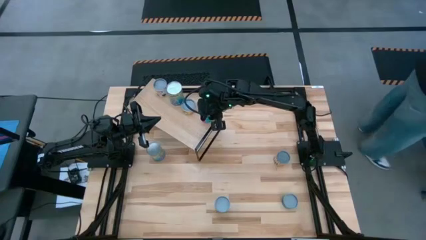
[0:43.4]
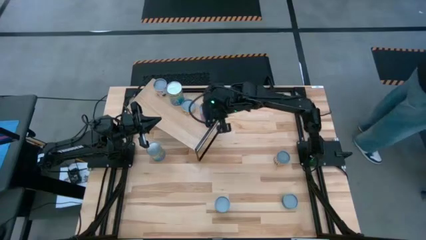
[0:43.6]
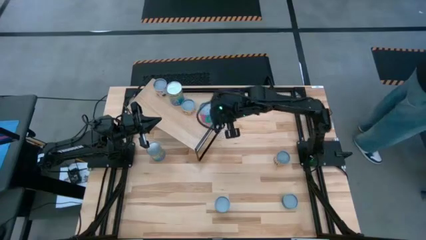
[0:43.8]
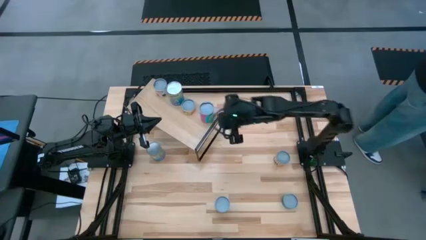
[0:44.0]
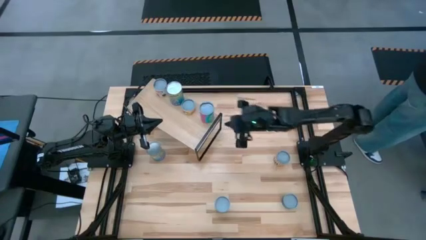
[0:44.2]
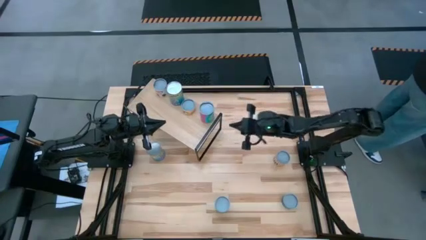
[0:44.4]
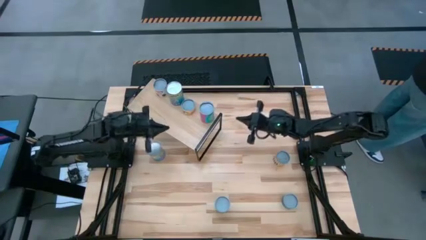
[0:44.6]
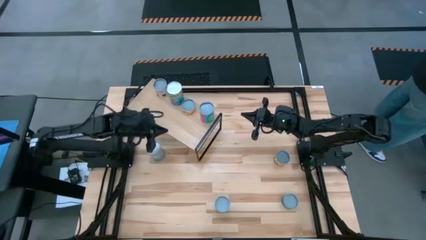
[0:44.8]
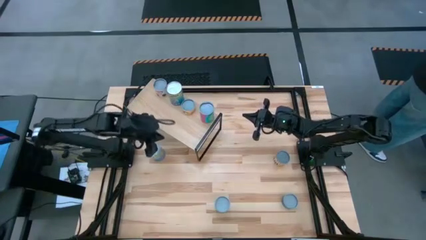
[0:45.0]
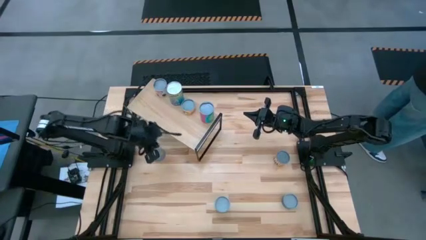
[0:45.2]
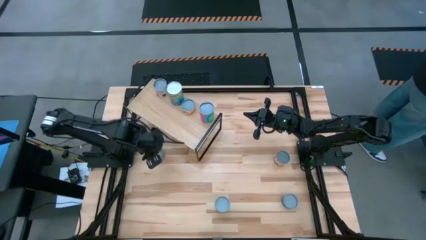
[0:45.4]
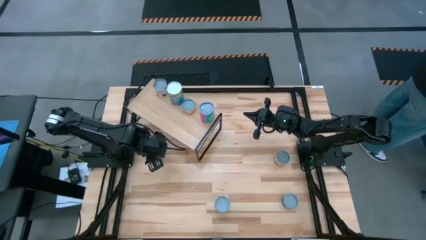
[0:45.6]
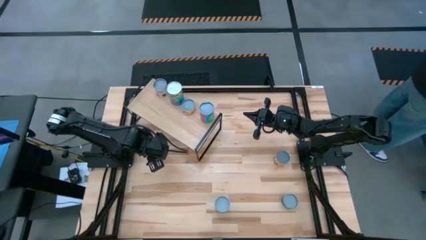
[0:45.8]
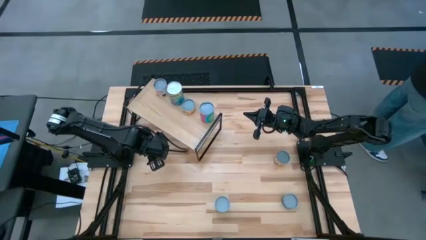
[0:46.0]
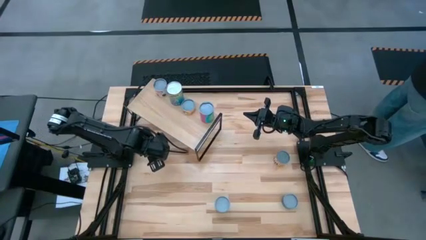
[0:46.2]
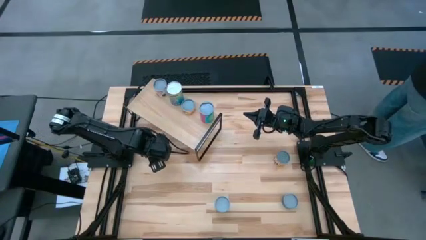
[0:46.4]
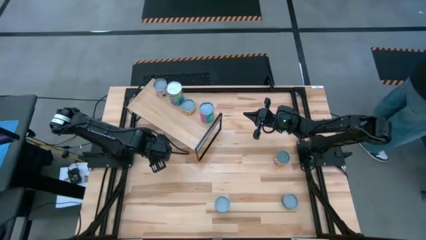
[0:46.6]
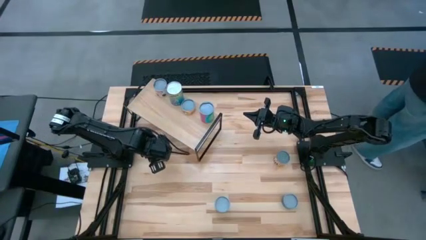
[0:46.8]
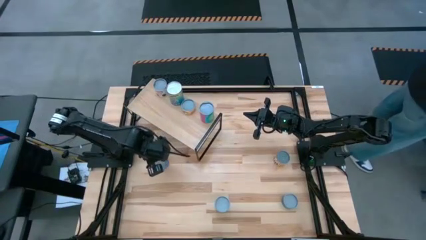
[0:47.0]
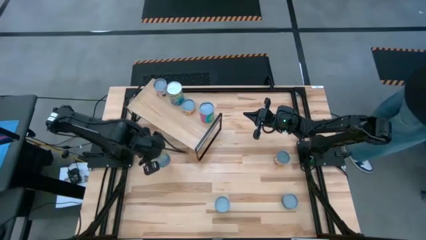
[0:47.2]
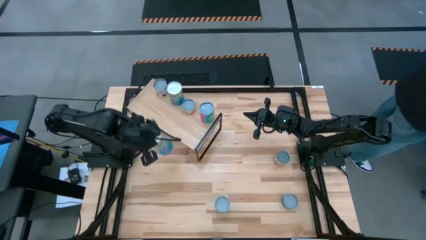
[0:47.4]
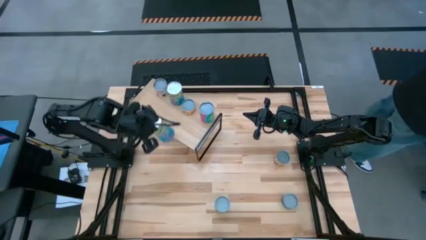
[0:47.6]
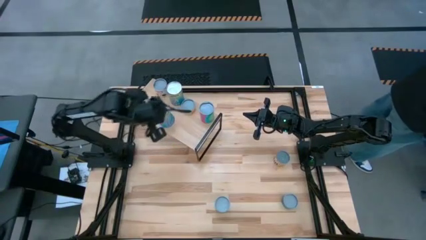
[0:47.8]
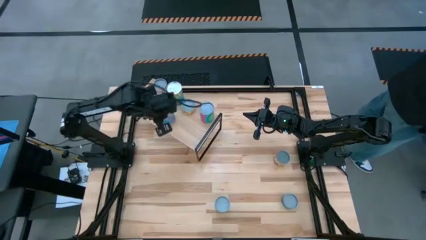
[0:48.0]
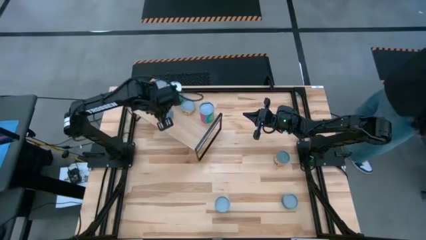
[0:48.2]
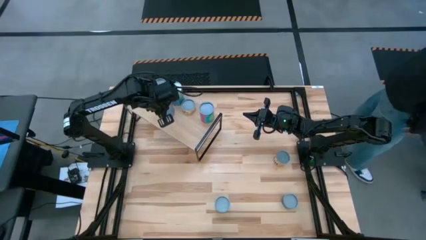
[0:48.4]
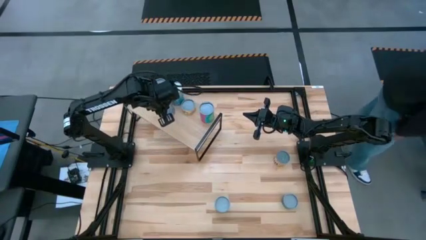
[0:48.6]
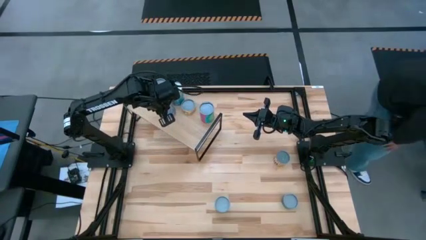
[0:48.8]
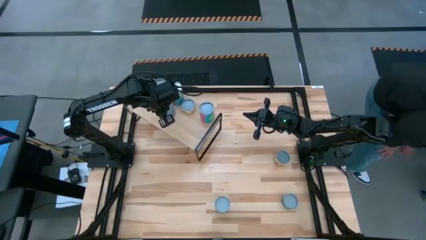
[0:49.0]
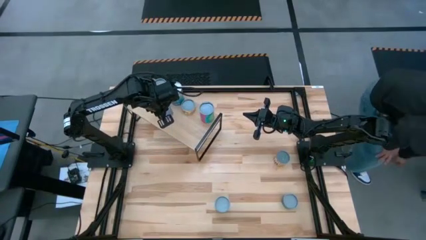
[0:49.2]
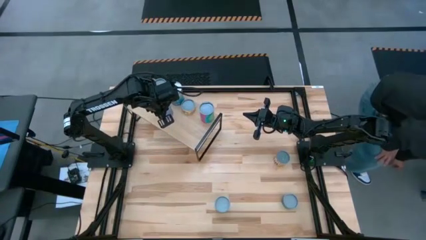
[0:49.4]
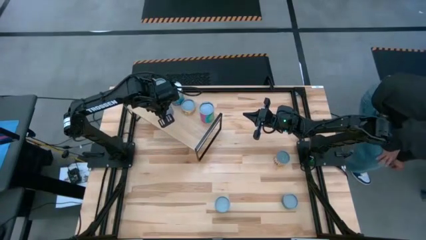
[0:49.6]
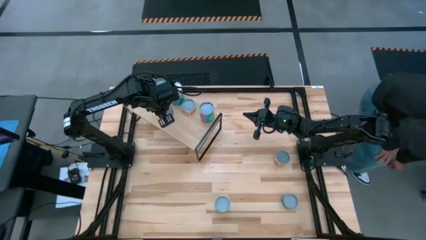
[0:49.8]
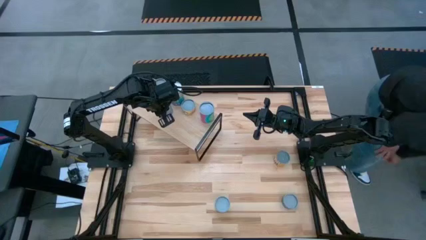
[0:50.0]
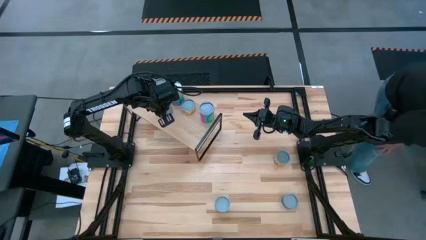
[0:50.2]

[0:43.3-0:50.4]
Task: Pick and place cans onto a shelf
Put the canned peaches on the shelf

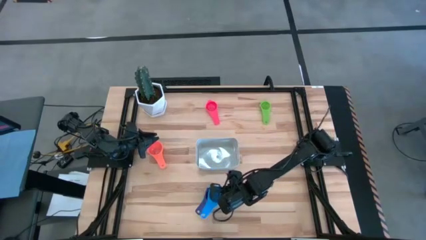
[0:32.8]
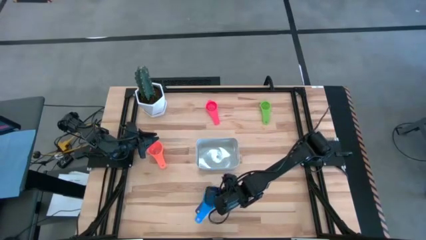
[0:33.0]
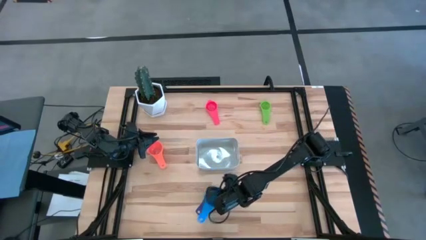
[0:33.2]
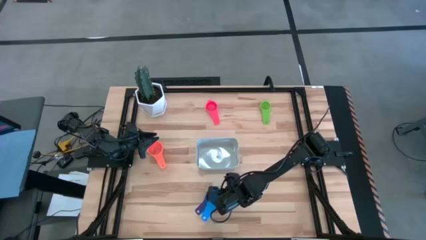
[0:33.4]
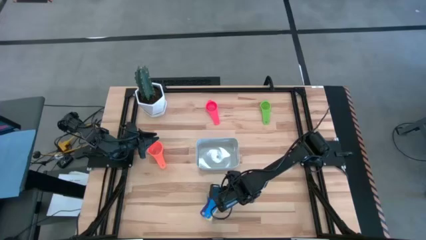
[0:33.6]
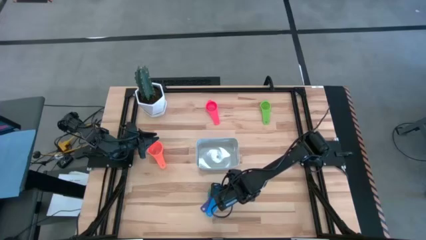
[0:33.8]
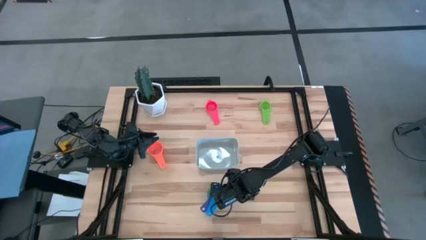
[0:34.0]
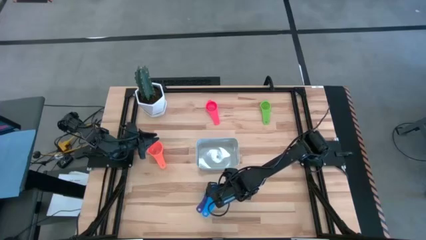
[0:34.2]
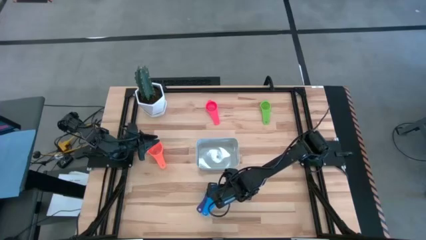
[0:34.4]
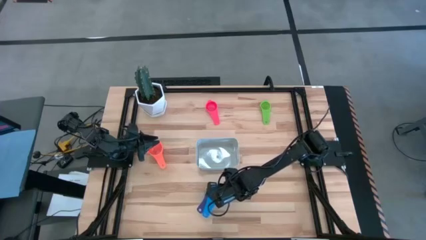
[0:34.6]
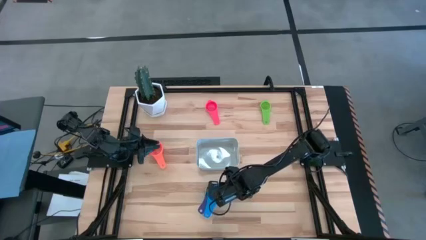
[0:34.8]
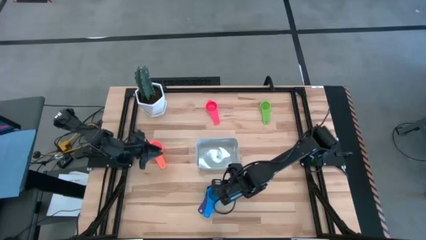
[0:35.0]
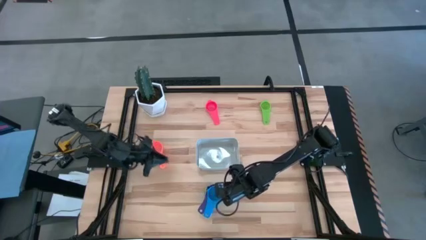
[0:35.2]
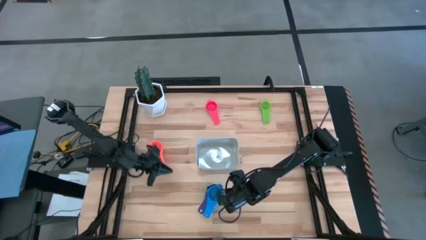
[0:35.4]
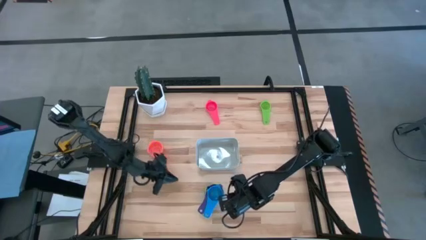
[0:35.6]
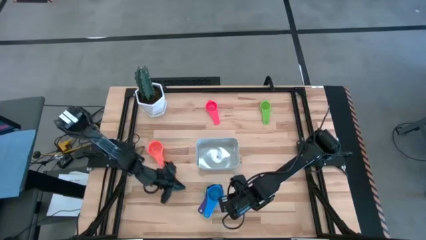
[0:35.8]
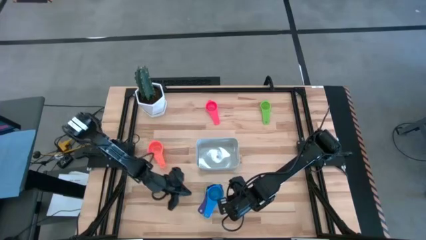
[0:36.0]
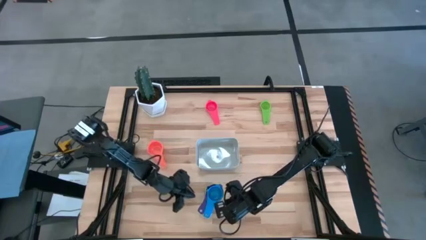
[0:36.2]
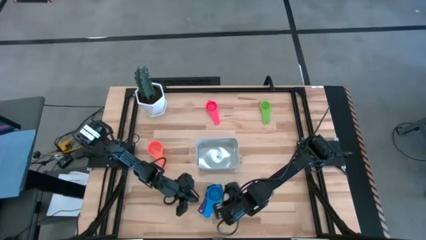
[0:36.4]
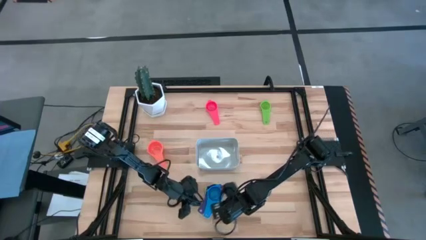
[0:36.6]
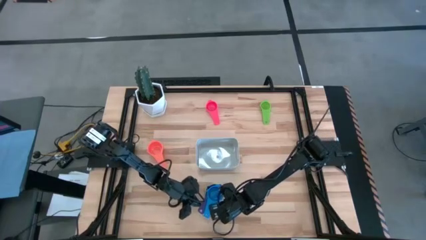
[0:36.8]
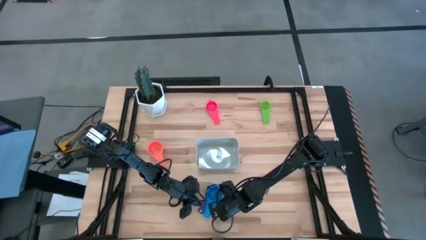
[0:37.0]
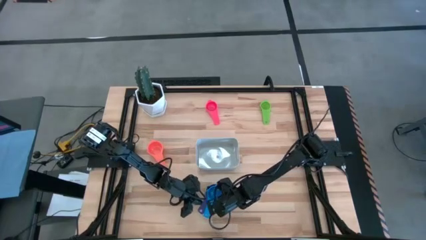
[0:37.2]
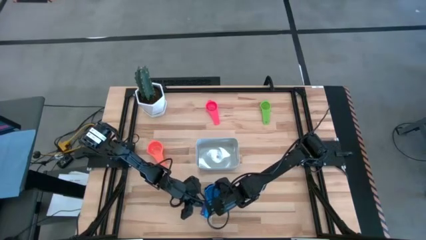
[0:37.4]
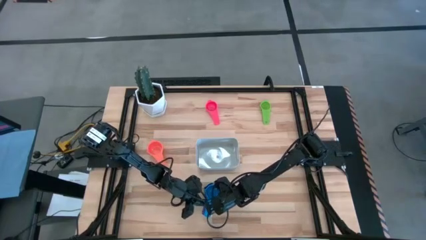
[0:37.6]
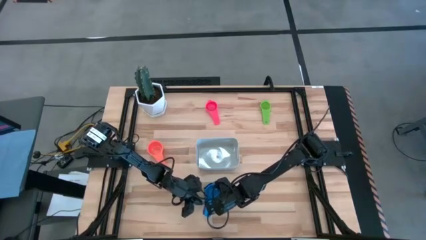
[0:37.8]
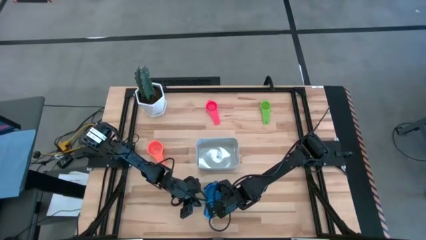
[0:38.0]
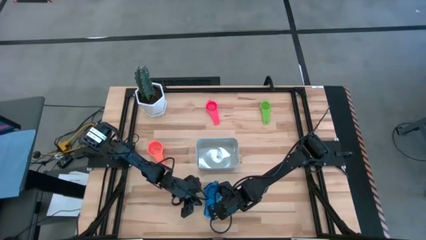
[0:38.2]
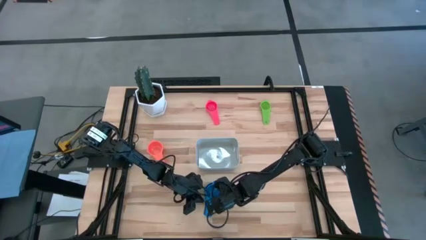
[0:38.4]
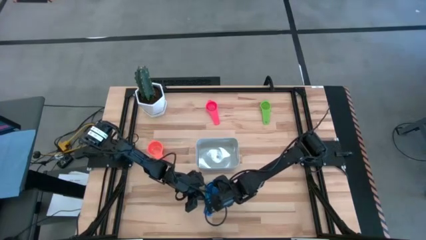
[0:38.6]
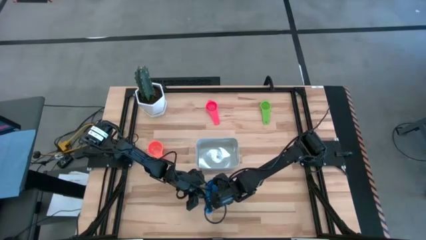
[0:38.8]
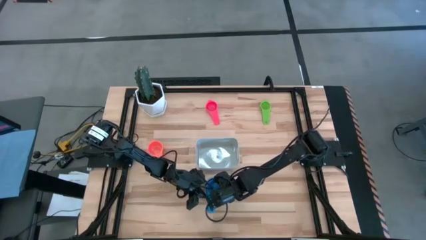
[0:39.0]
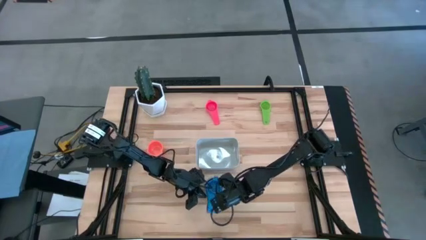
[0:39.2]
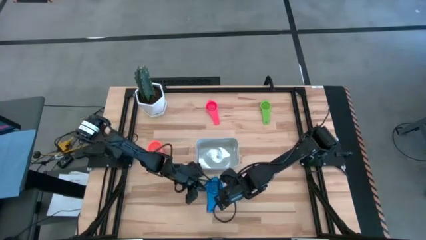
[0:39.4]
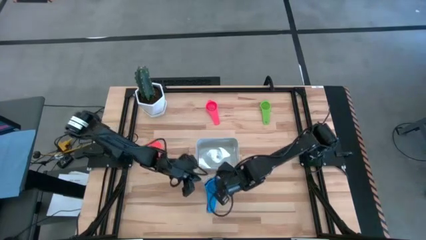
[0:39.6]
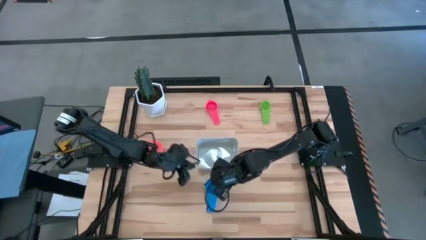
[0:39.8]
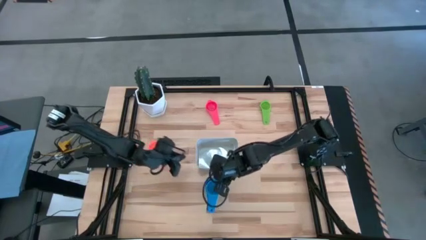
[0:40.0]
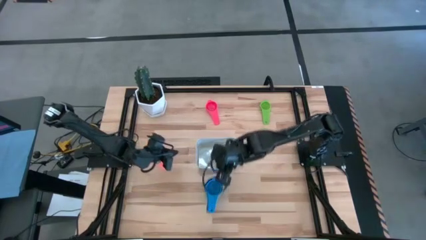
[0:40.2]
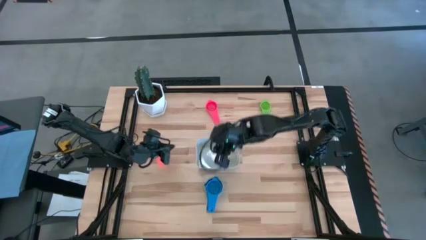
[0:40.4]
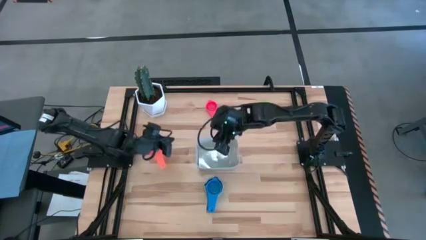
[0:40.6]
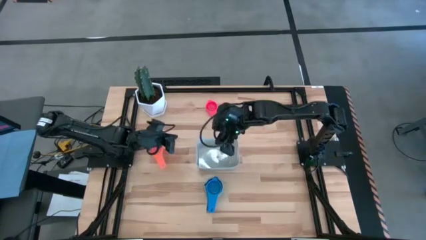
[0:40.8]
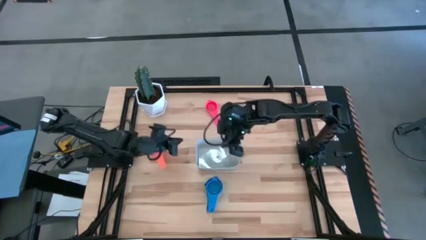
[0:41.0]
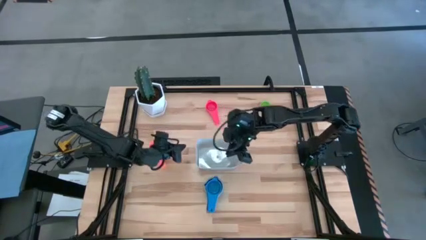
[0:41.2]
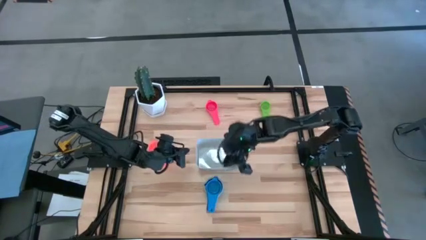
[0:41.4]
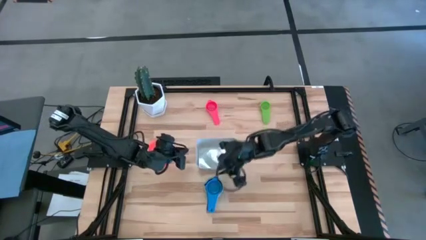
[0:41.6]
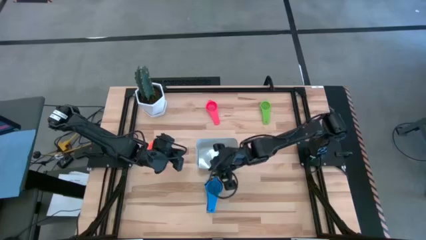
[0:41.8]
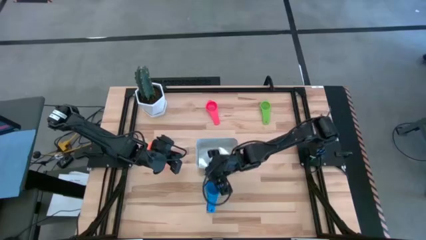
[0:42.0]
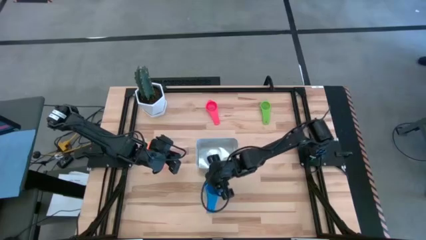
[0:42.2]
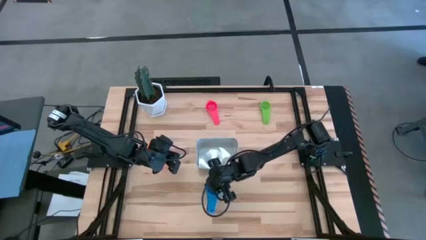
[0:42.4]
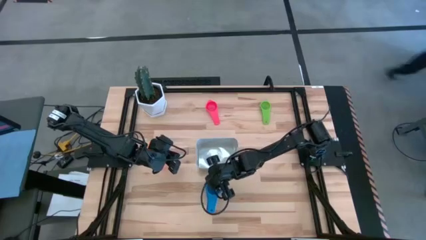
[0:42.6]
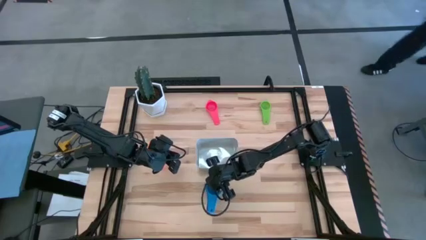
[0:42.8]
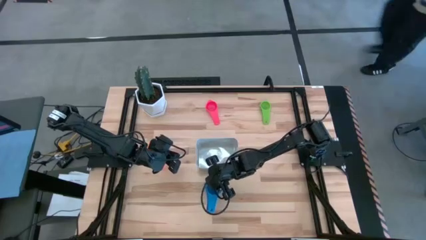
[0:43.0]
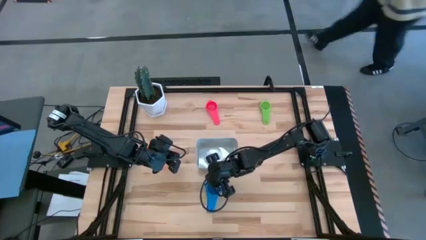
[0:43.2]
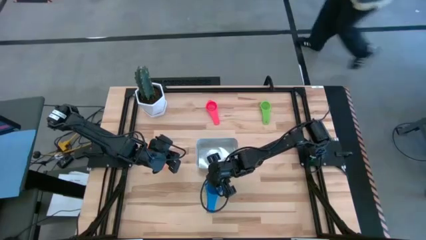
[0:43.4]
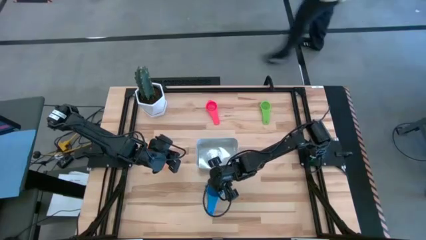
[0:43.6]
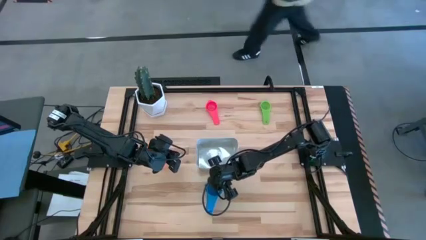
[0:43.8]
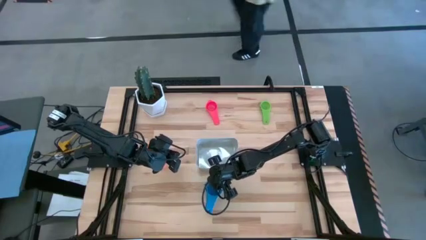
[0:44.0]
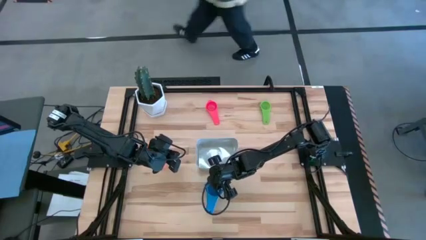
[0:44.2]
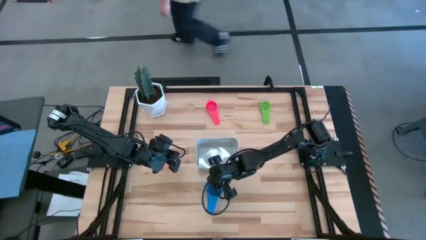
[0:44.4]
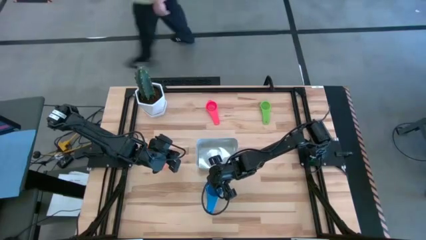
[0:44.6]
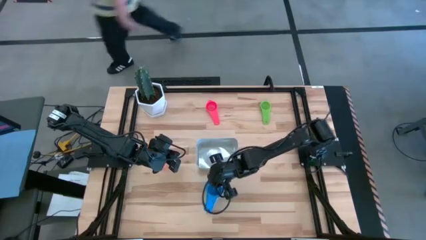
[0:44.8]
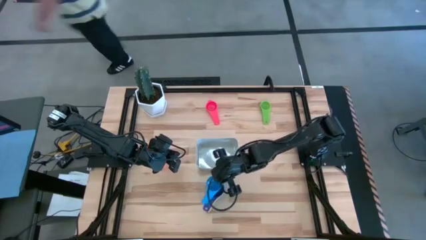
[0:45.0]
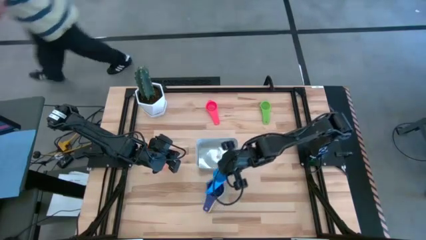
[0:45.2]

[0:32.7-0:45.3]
Task: Nest measuring cups in basket
Stack the blue measuring cup on top of the dark blue measuring cup
